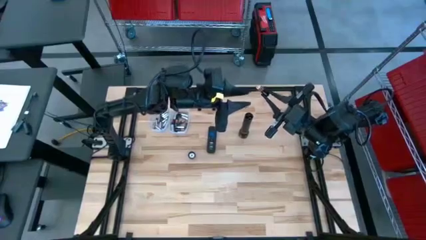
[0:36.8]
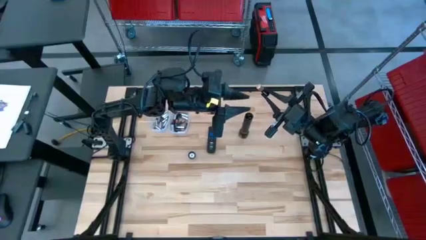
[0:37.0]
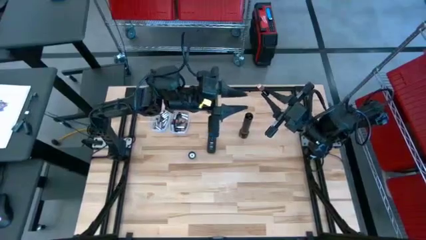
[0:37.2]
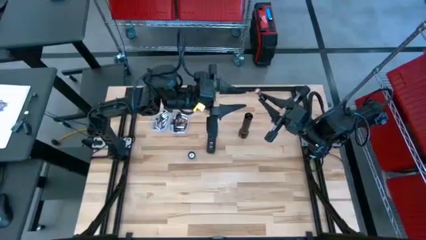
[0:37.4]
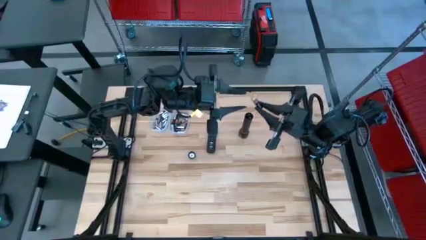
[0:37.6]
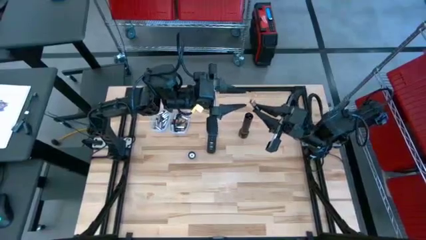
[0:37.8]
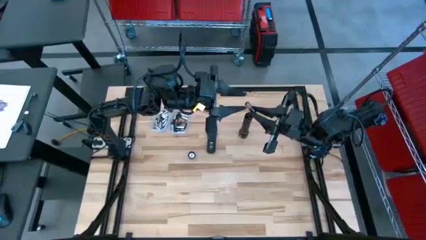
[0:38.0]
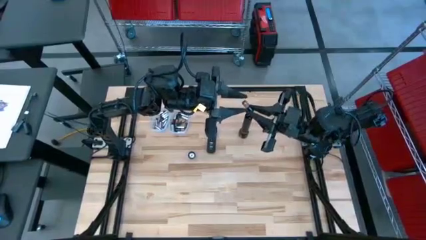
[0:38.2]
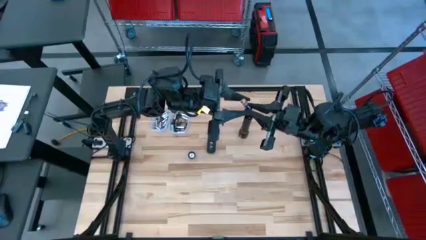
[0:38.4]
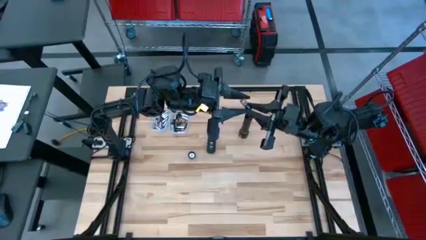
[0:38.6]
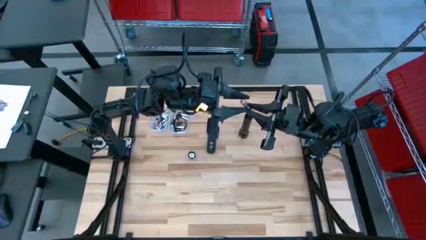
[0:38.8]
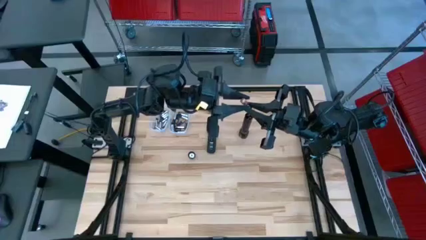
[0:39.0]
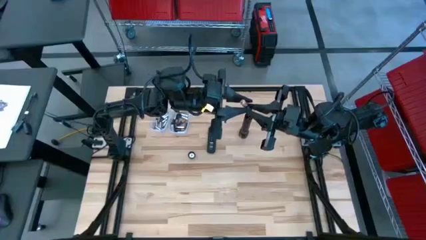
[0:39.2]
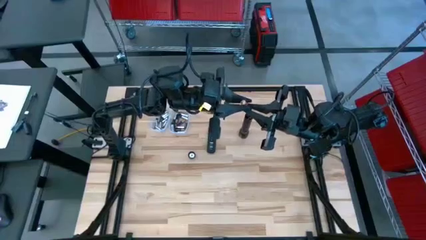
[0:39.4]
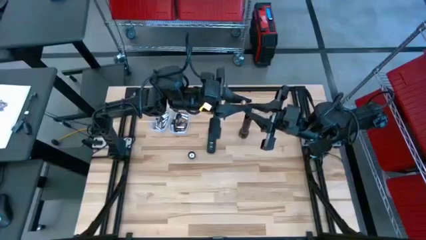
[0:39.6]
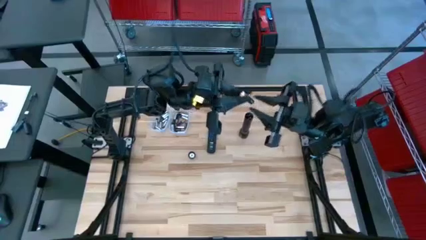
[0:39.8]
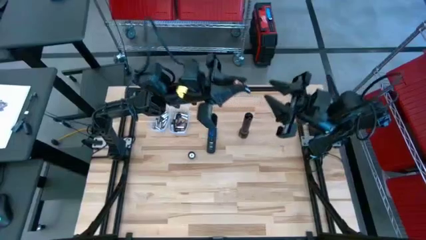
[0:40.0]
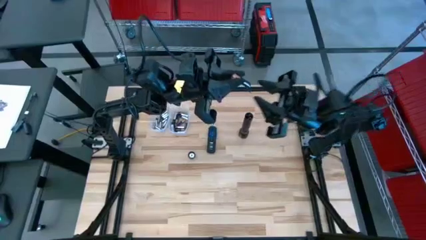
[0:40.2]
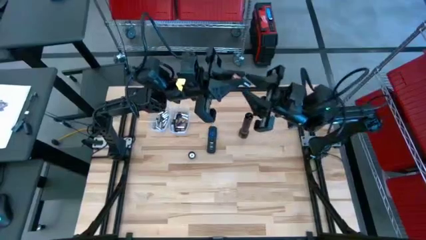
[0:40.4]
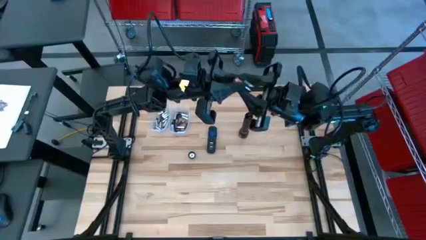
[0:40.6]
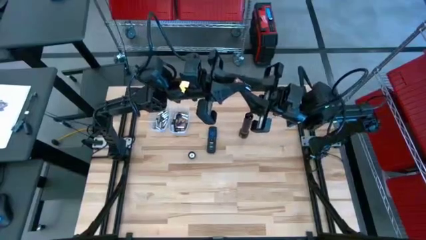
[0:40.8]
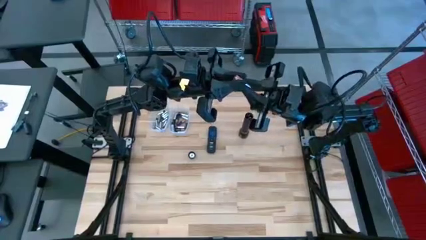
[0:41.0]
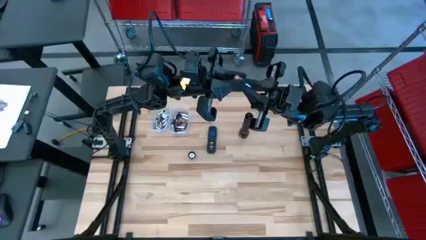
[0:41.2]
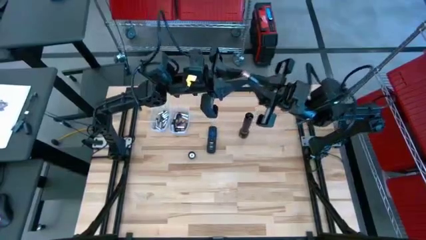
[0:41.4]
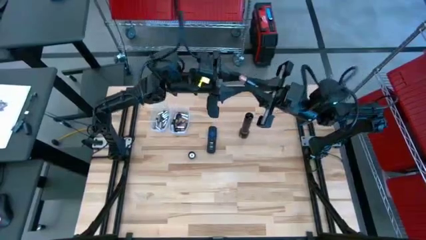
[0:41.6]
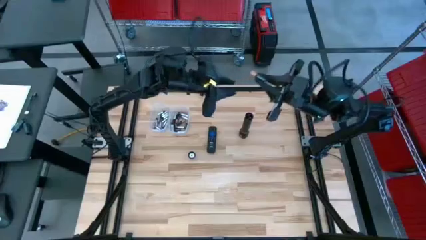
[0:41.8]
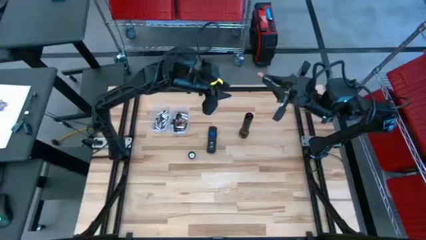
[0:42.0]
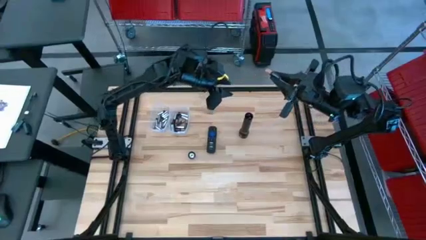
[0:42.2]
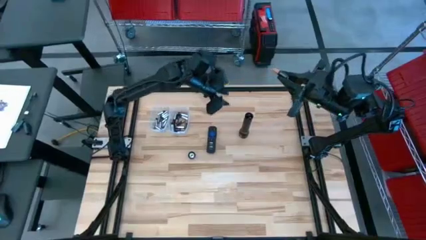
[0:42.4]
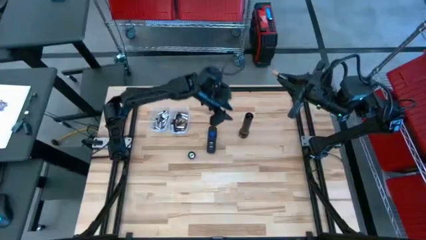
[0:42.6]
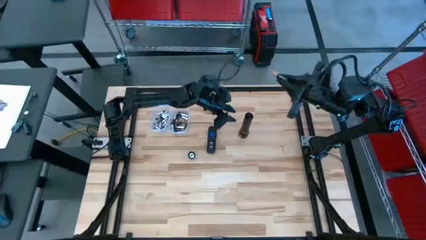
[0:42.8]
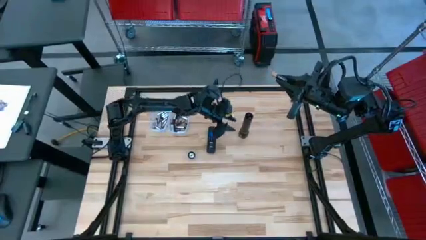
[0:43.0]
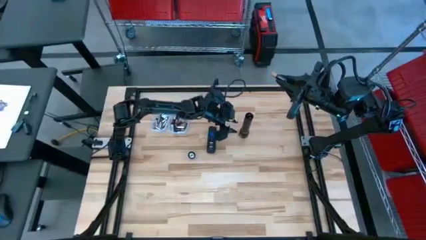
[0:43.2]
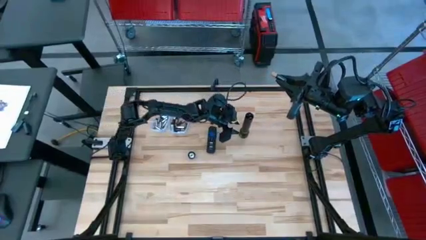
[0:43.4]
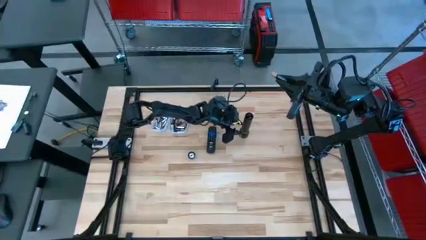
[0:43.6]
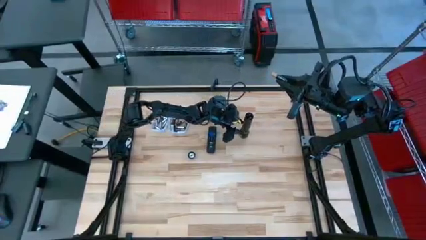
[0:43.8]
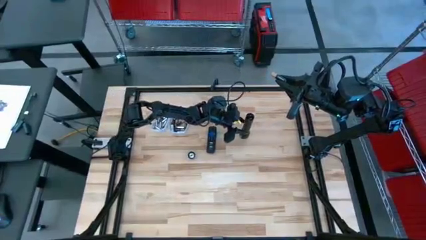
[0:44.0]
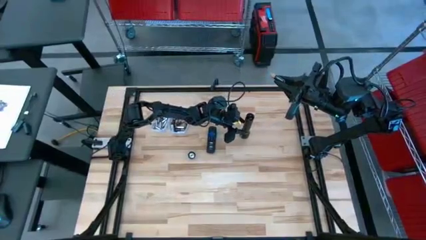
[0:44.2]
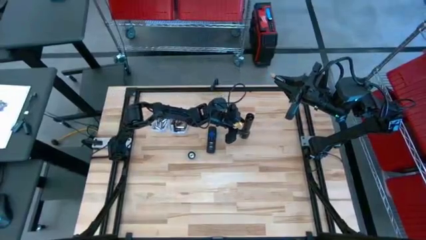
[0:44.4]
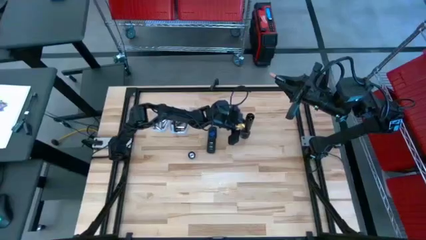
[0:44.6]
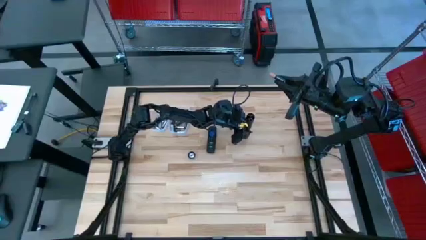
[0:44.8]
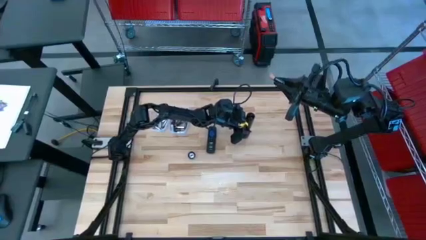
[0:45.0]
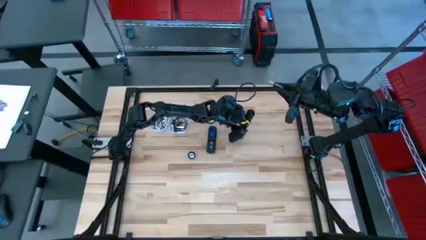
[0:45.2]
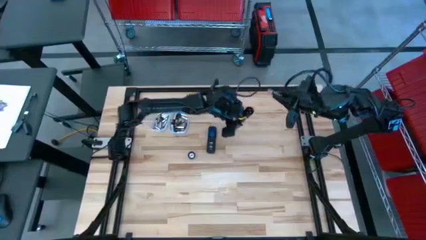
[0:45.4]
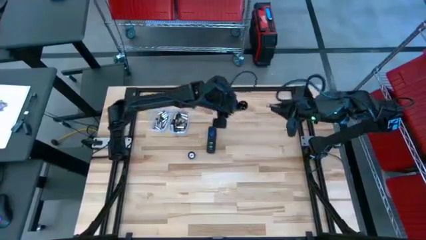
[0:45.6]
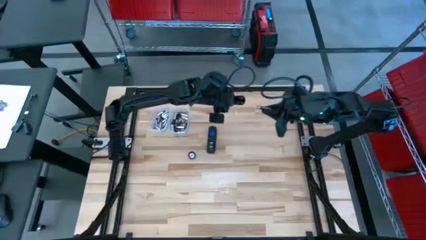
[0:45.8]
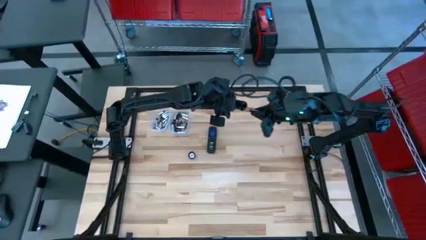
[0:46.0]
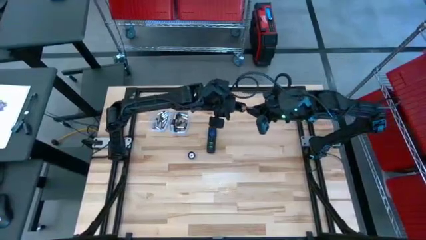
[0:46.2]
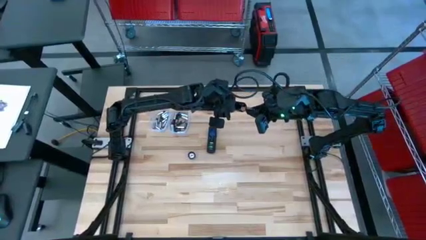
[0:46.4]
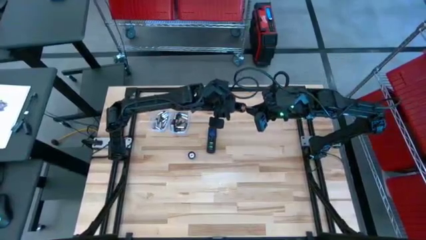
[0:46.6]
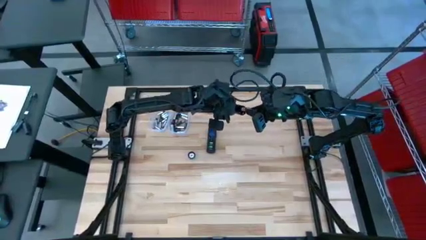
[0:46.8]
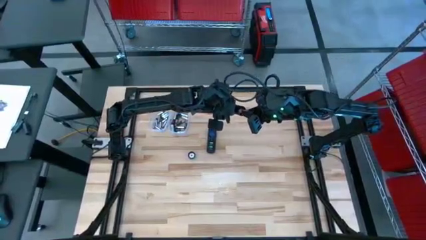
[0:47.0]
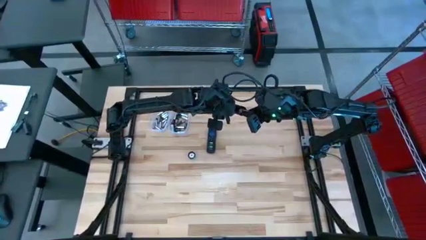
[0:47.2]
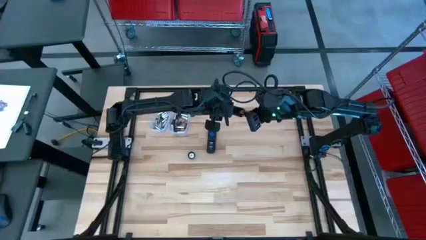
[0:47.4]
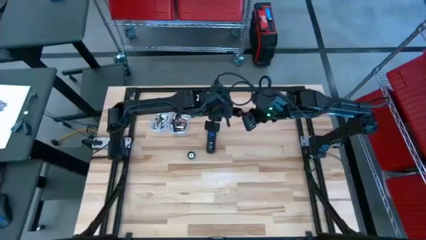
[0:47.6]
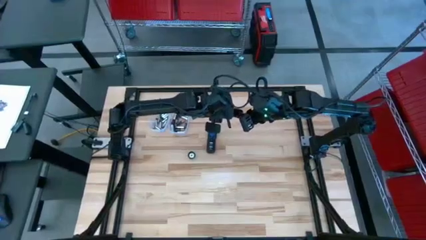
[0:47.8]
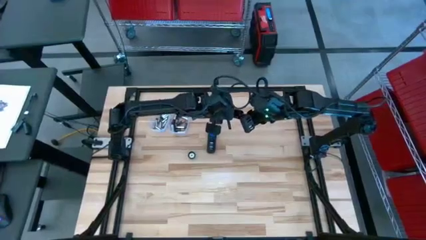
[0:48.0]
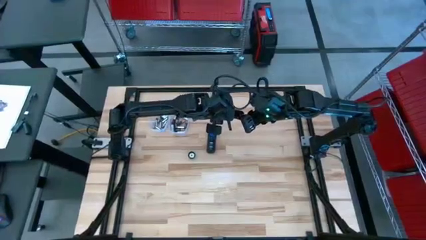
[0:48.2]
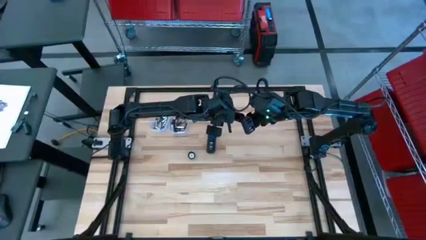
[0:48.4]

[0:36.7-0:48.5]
Task: Insert battery
Insert the brown battery into the flashlight battery compartment

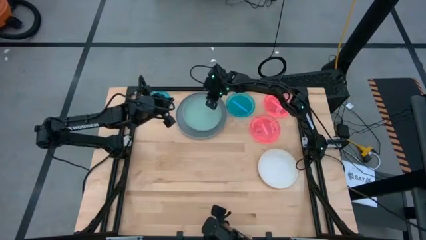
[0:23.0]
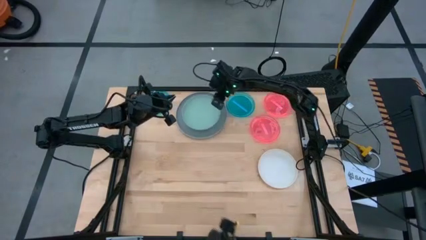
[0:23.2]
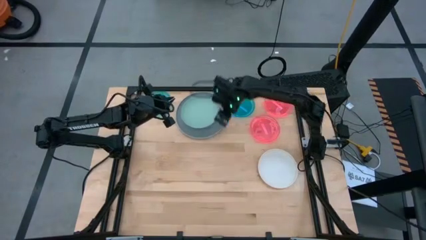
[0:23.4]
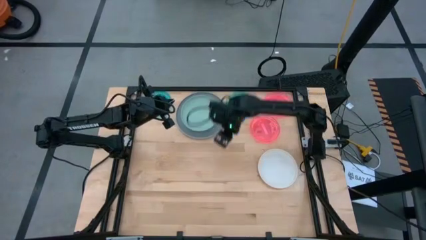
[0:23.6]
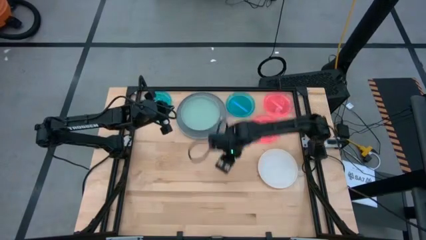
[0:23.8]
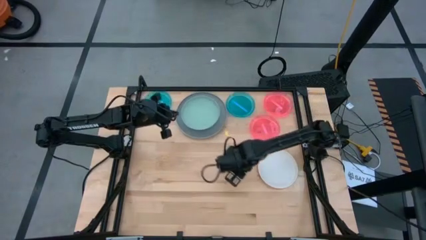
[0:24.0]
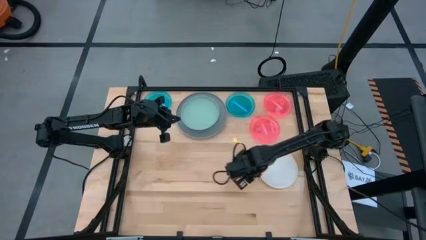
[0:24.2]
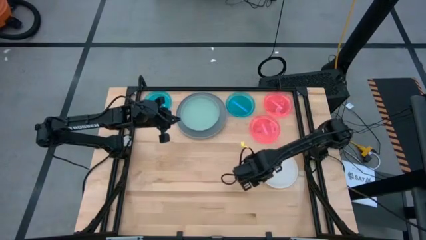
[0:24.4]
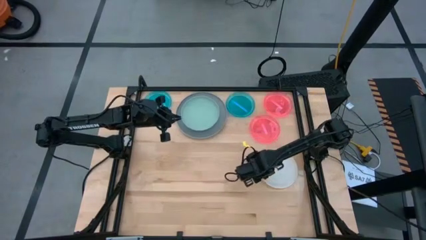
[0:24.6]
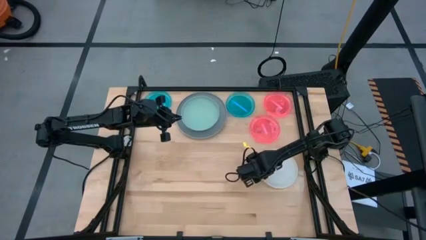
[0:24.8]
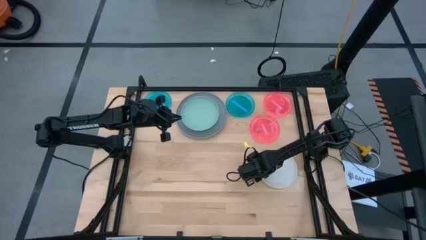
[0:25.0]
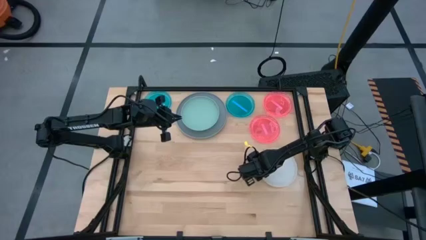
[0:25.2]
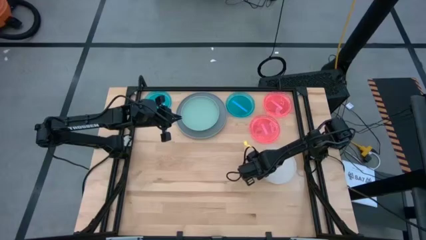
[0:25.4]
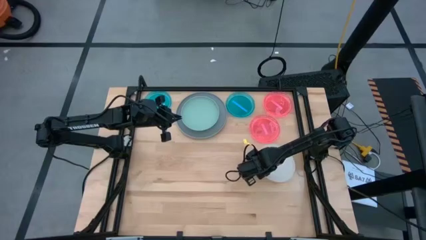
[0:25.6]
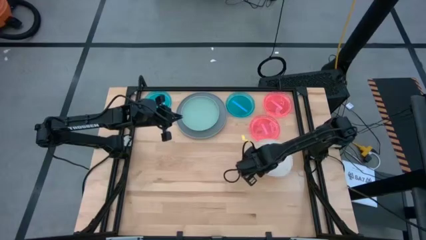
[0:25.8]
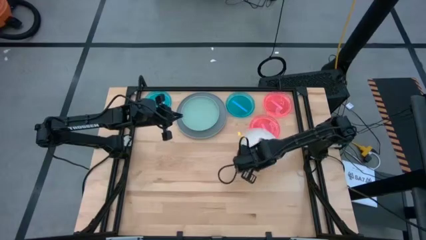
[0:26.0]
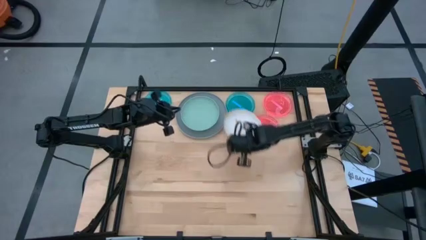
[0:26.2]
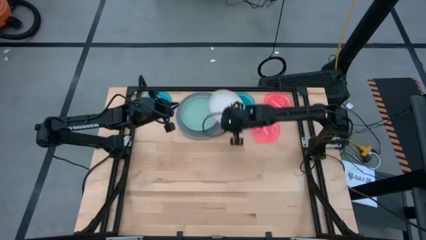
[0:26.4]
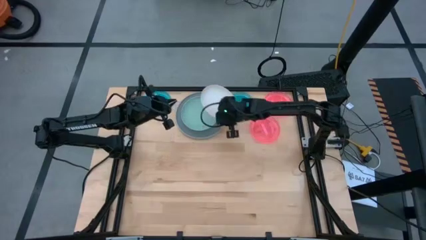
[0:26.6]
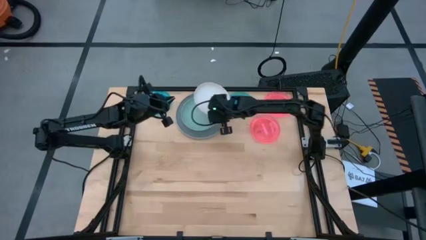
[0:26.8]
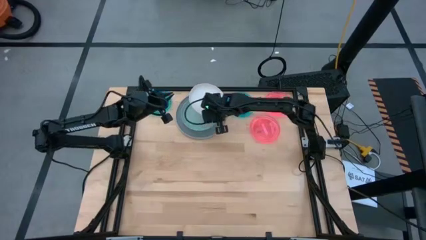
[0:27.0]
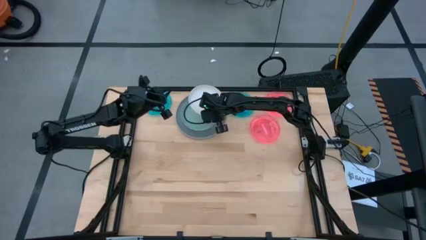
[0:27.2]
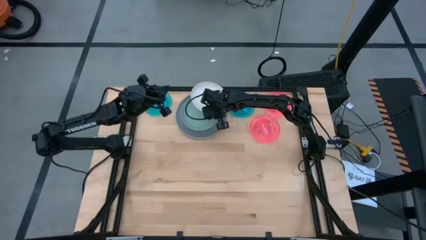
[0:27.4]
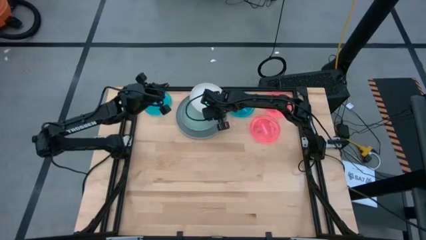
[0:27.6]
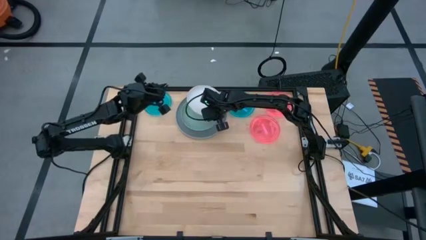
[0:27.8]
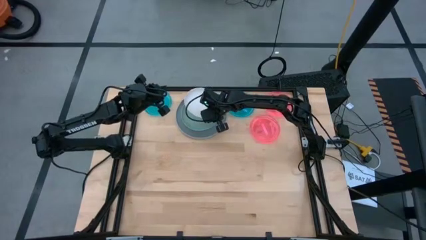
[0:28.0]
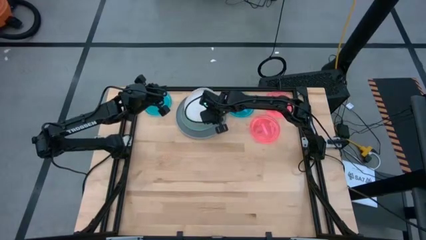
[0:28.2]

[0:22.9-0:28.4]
Task: Stack plastic plates
Stack the white plate on top of the light green plate
